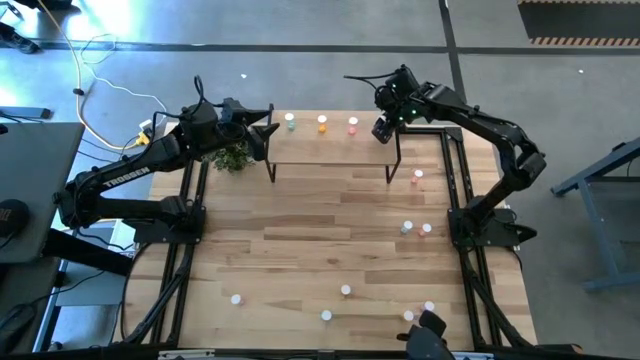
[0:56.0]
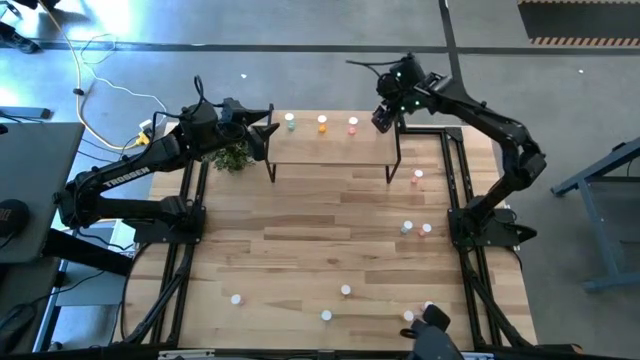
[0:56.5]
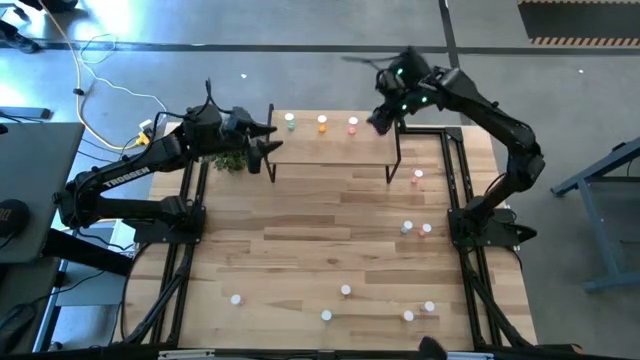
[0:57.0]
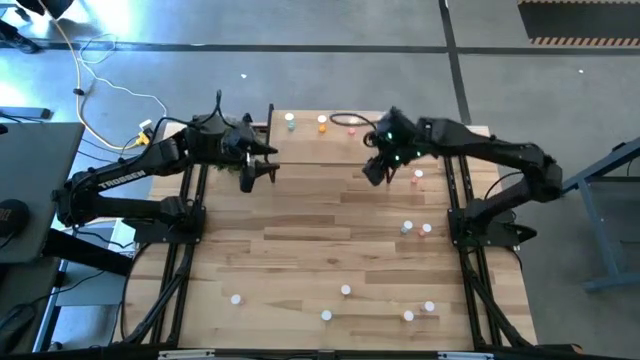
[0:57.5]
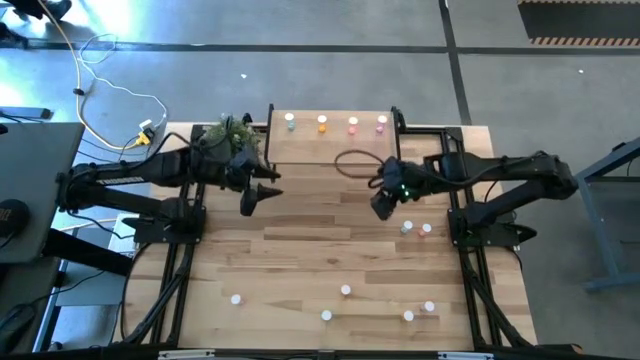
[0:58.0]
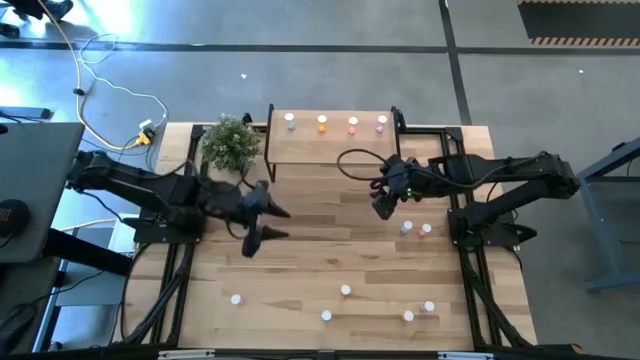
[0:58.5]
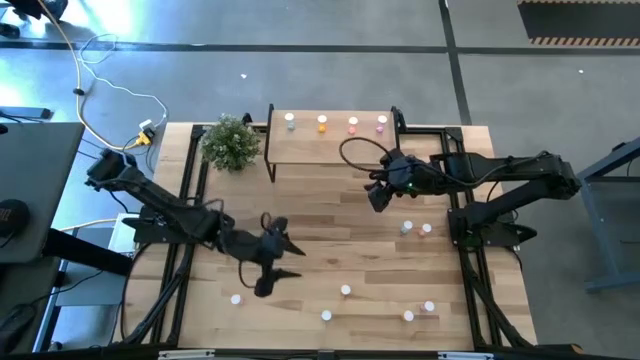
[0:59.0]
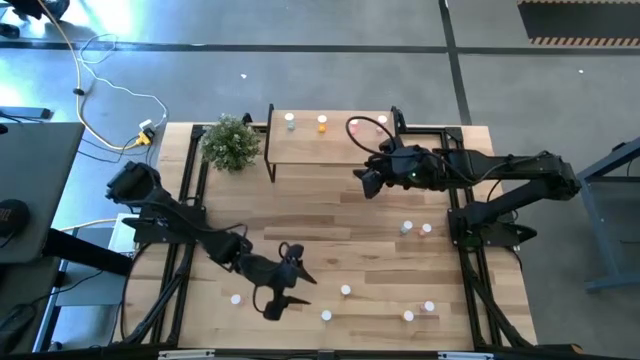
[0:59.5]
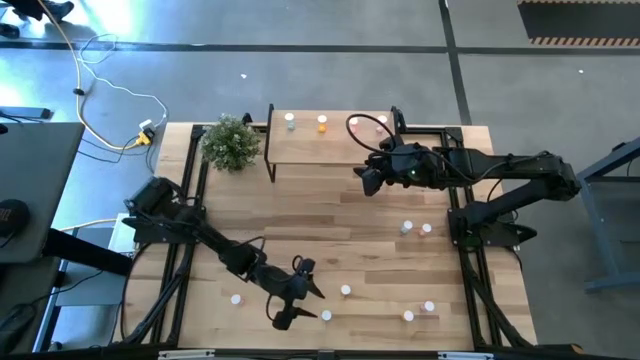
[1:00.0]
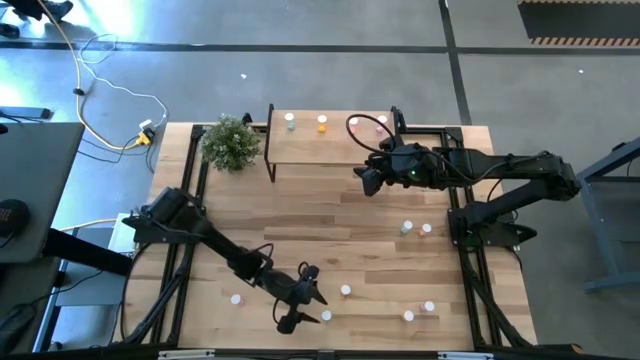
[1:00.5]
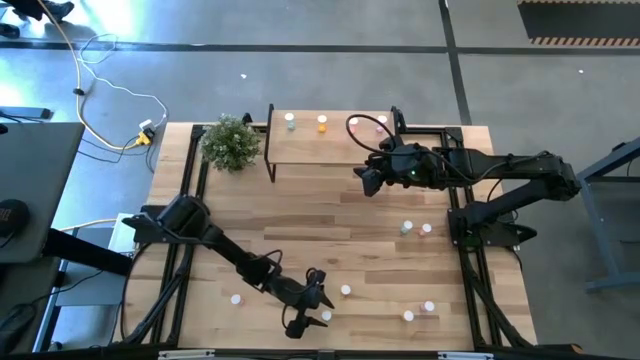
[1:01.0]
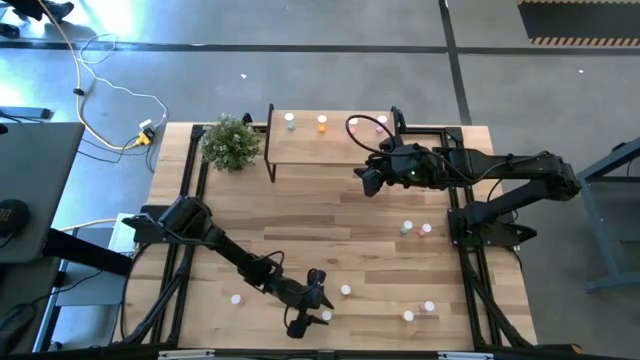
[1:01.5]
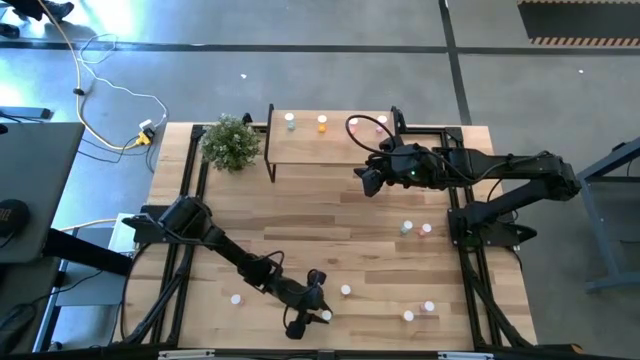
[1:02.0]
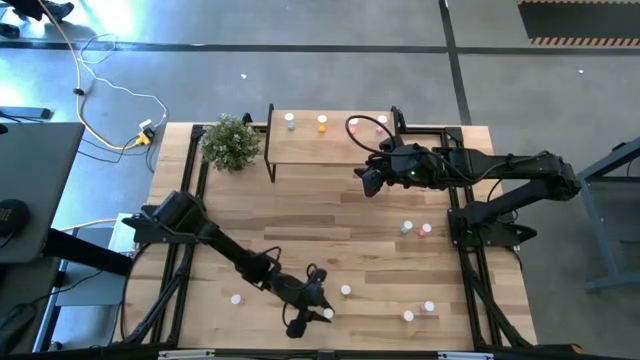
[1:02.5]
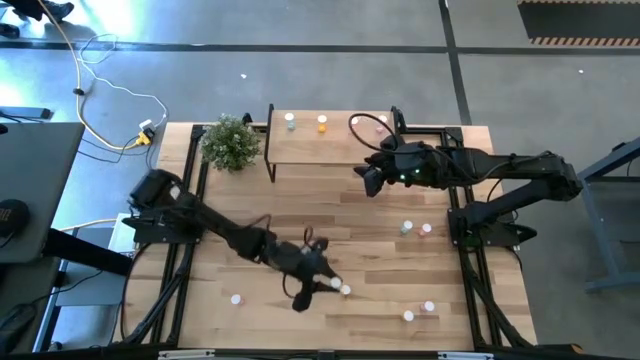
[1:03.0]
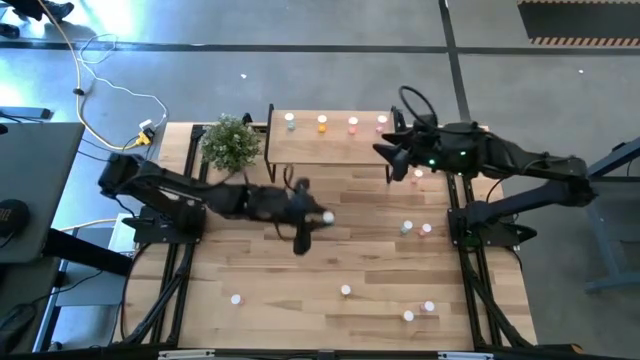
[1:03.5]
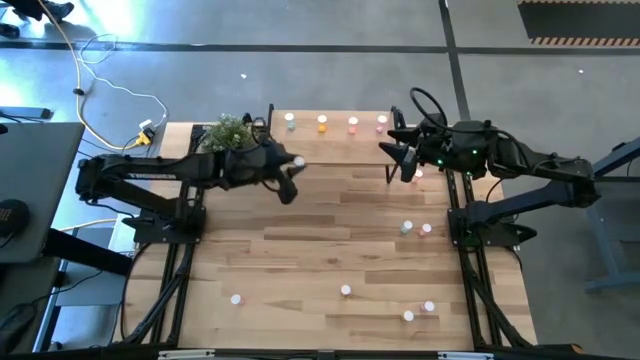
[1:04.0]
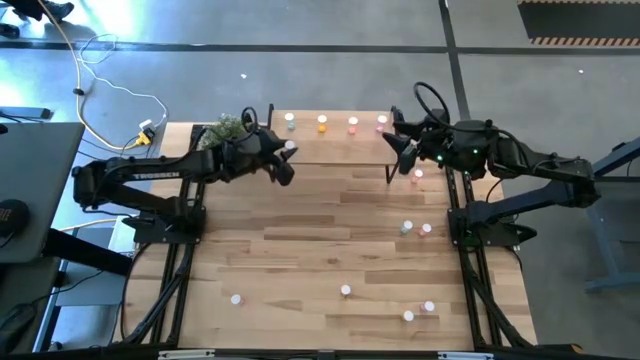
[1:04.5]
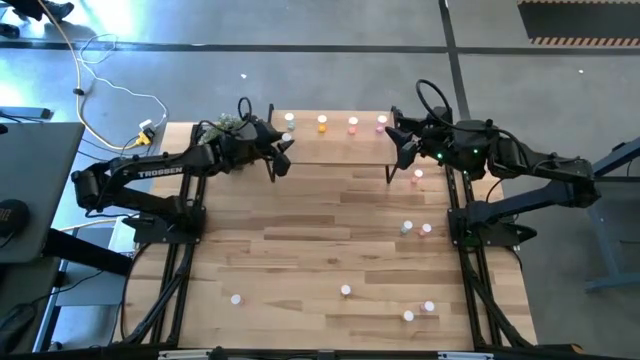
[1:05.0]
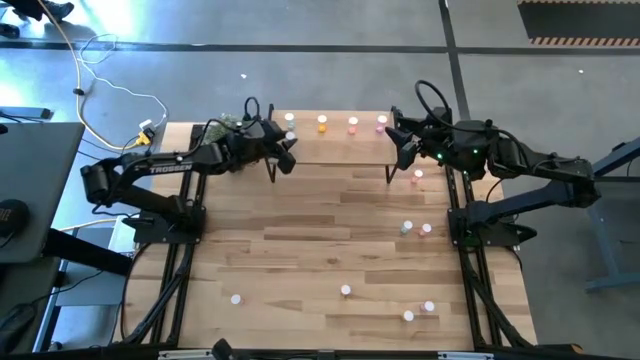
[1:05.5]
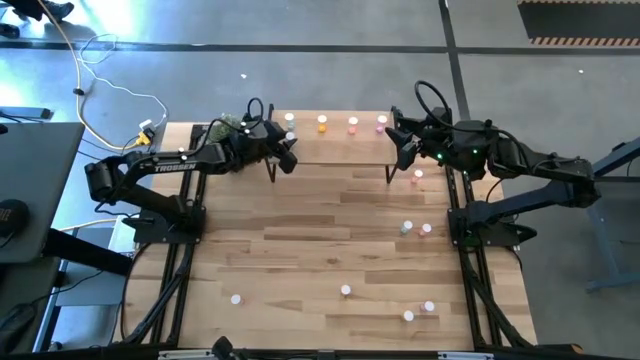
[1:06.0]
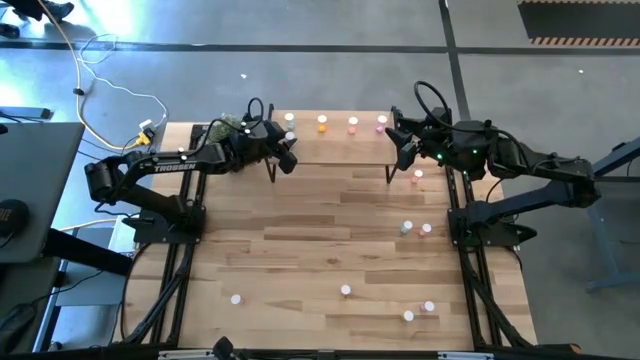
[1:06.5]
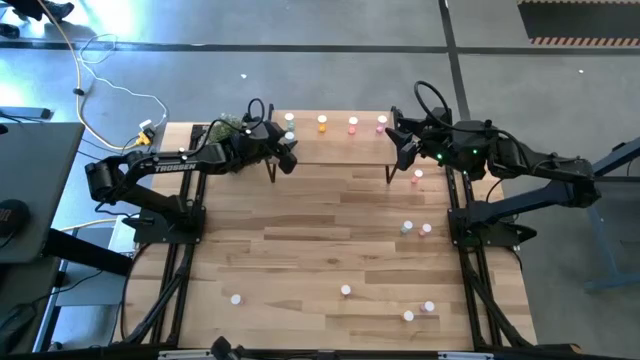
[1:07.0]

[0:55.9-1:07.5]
Task: Pick and place medicine bottles onto shelf by color
Put the bottom blue pill bottle on the shelf aligned with the other blue pill bottle

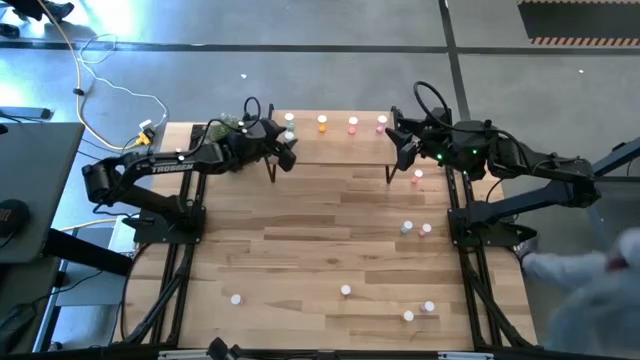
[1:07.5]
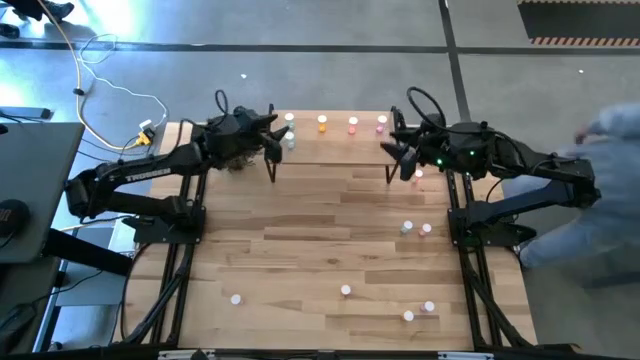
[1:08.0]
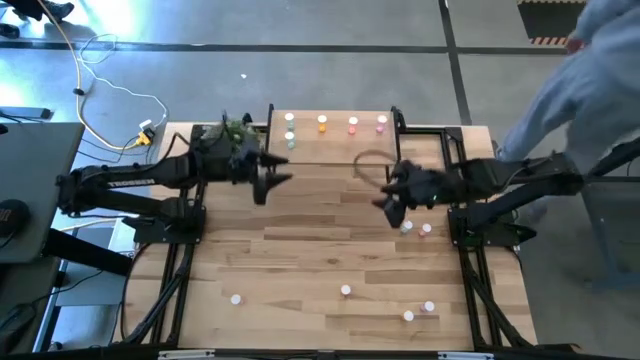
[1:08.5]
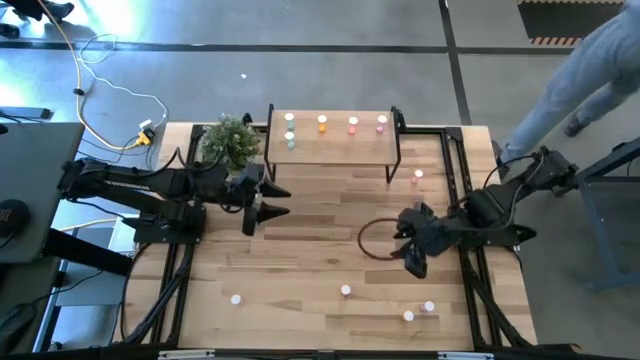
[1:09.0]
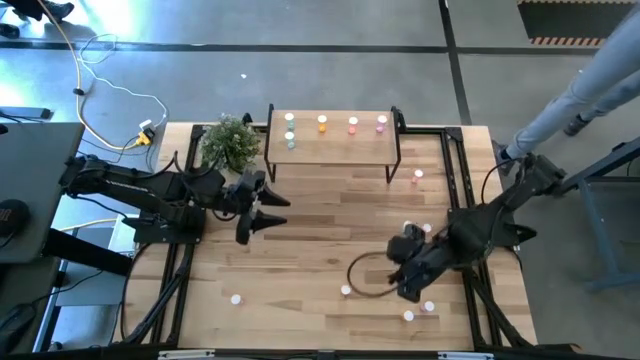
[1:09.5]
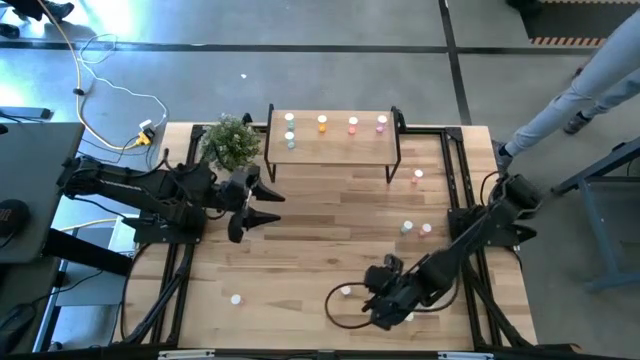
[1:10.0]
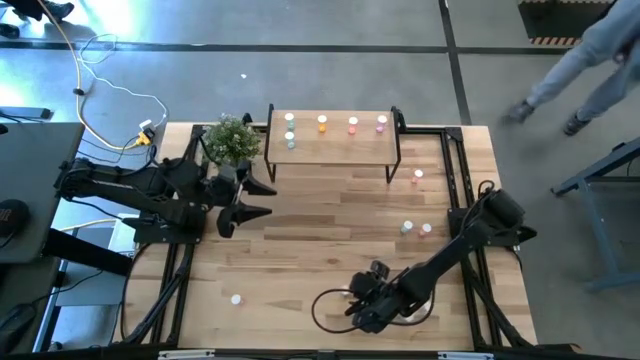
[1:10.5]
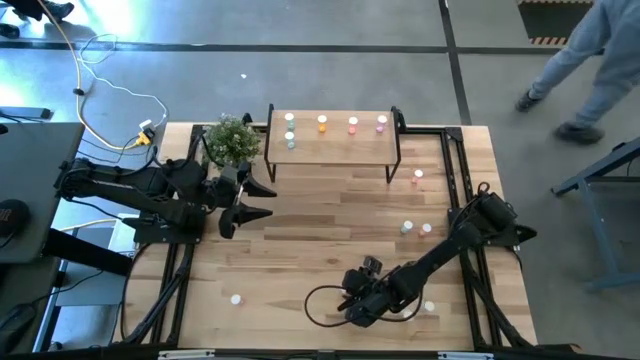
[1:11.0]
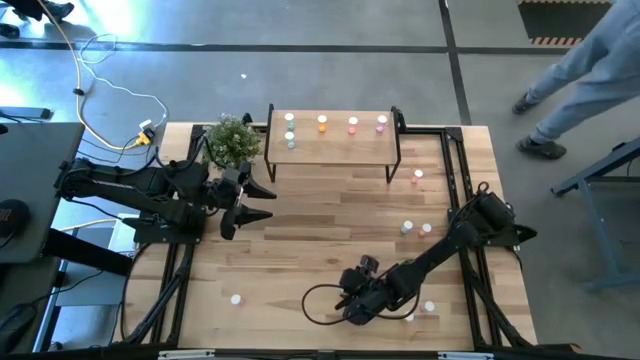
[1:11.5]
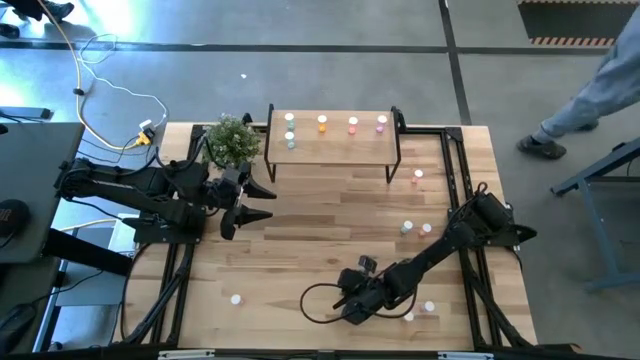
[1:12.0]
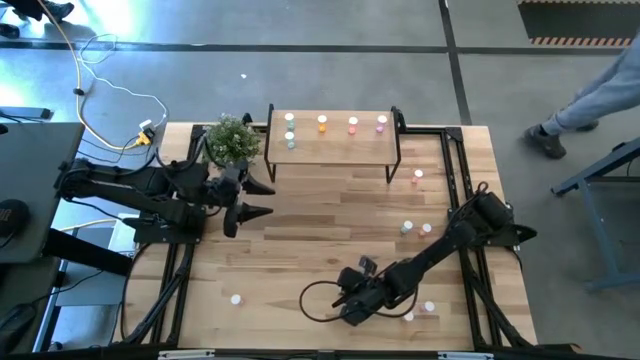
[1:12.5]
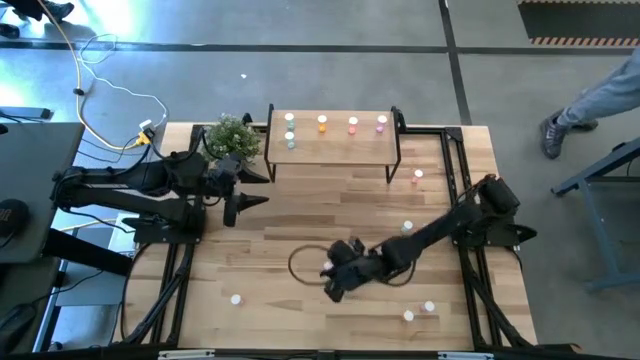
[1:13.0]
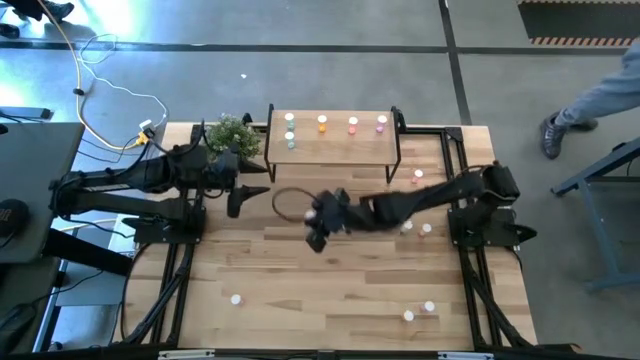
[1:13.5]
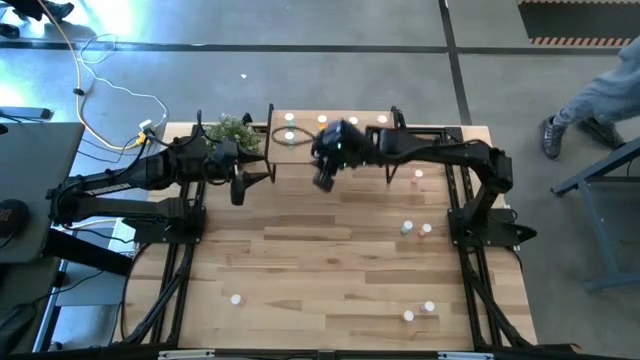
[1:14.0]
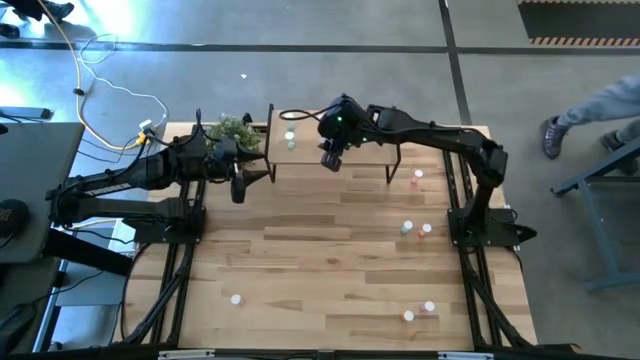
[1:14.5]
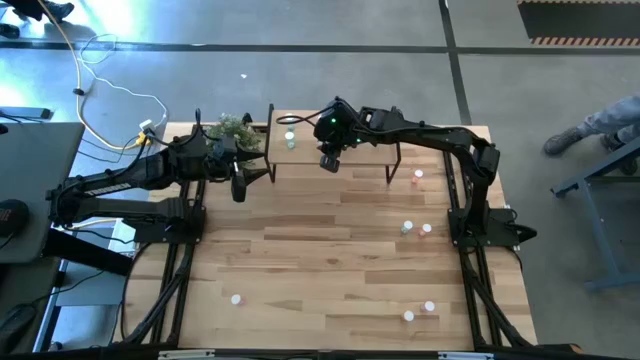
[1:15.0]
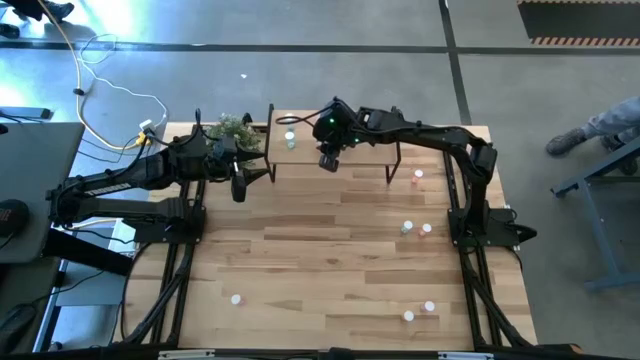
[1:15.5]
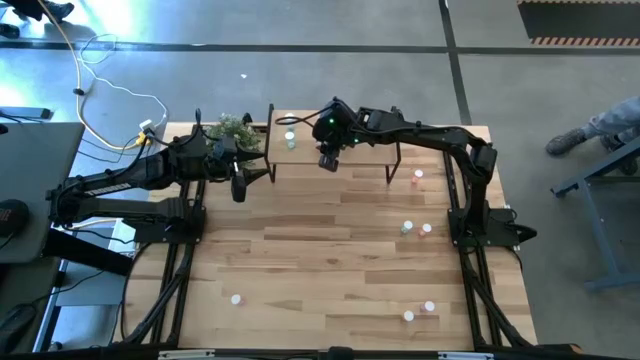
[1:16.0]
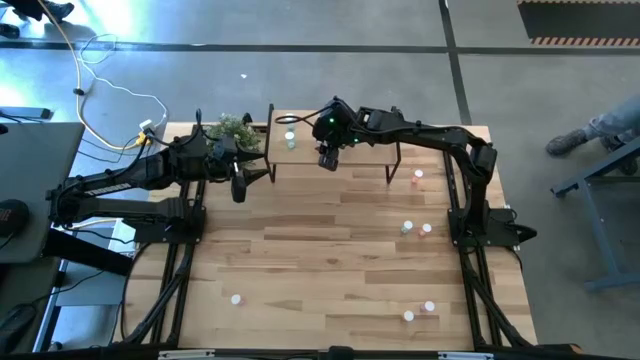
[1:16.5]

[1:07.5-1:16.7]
Put the left yellow pill bottle on the shelf aligned with the other yellow pill bottle
